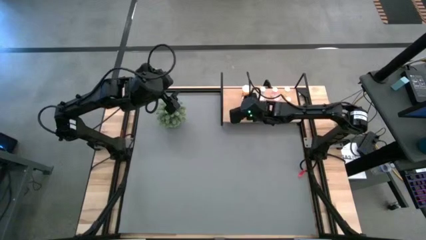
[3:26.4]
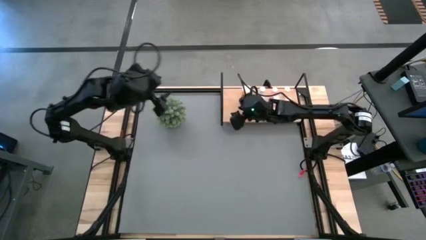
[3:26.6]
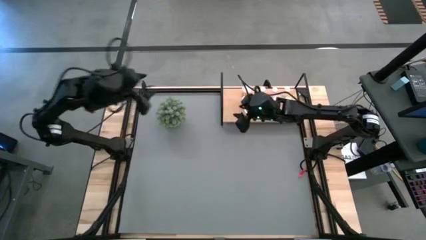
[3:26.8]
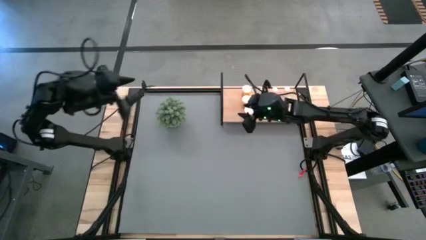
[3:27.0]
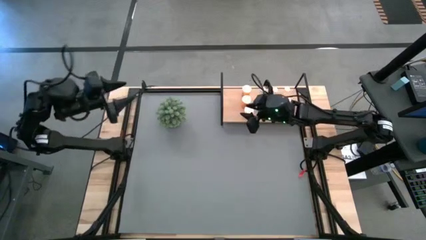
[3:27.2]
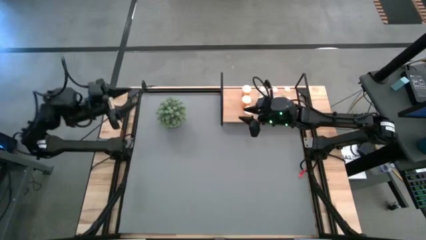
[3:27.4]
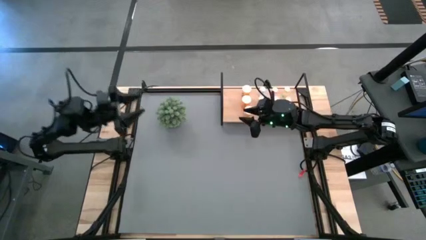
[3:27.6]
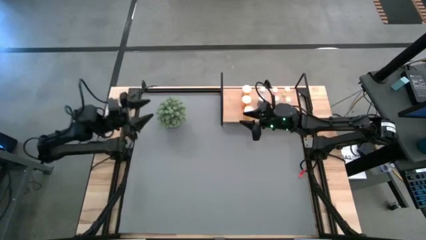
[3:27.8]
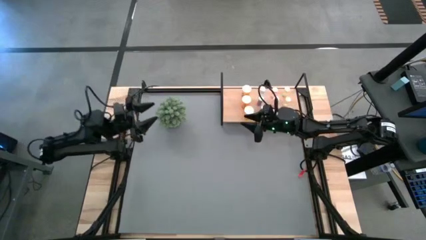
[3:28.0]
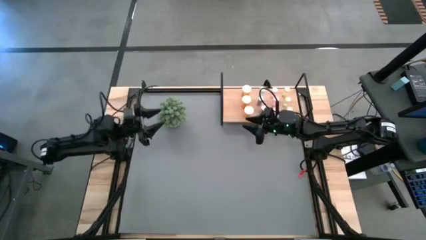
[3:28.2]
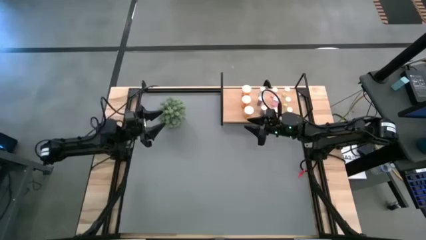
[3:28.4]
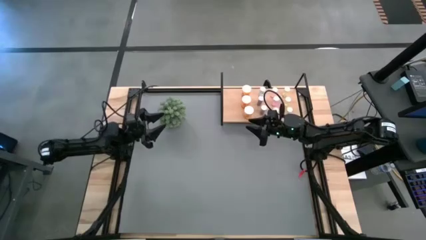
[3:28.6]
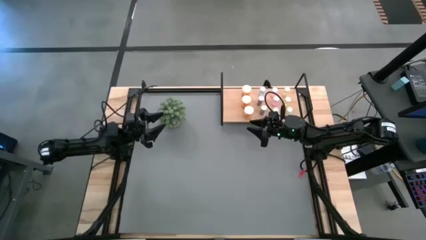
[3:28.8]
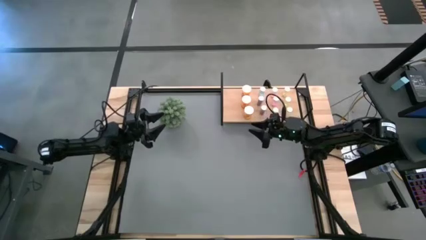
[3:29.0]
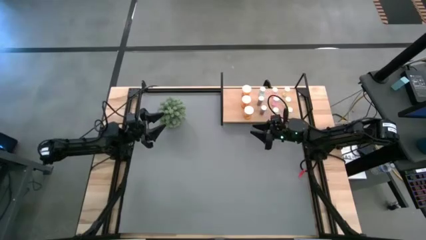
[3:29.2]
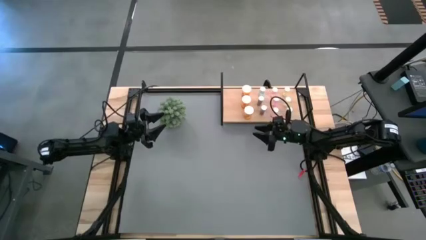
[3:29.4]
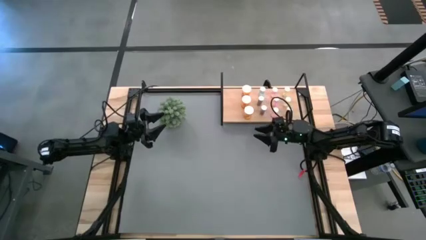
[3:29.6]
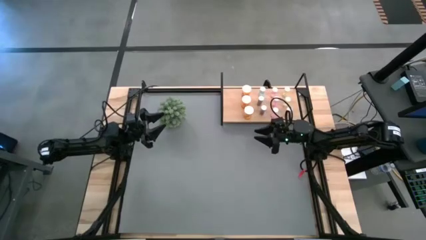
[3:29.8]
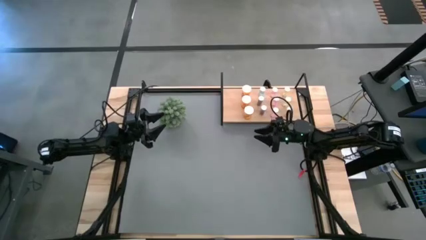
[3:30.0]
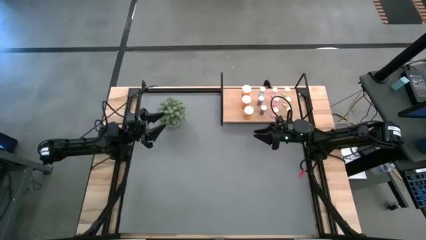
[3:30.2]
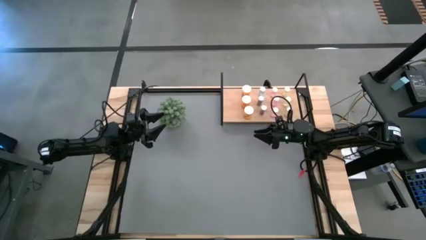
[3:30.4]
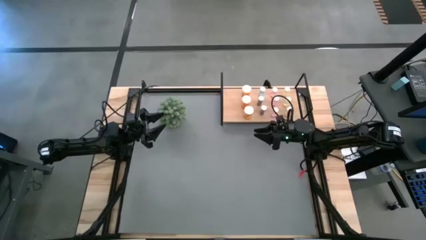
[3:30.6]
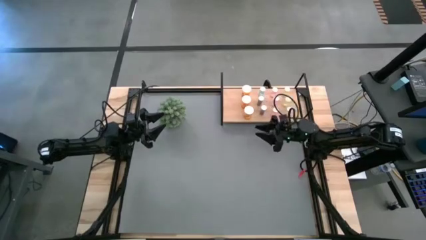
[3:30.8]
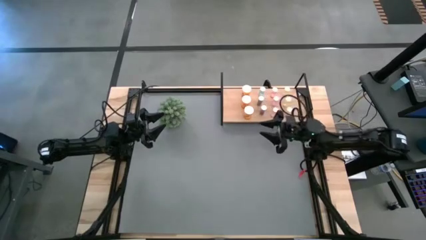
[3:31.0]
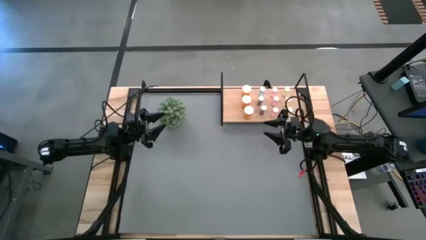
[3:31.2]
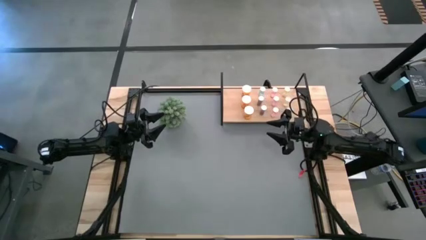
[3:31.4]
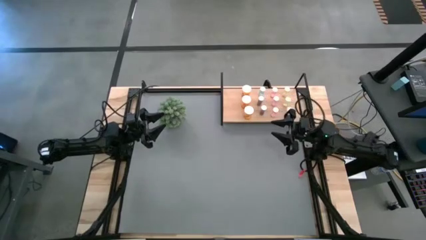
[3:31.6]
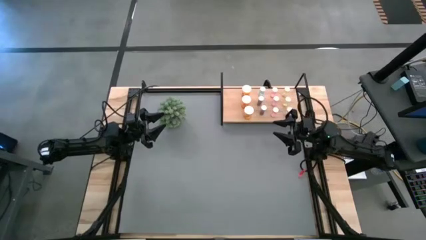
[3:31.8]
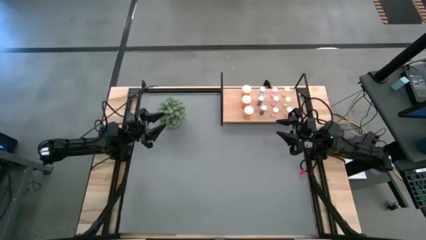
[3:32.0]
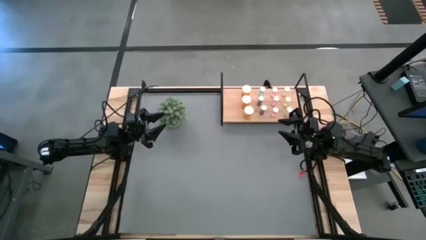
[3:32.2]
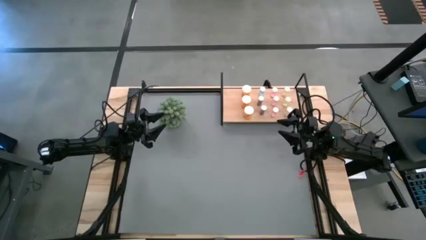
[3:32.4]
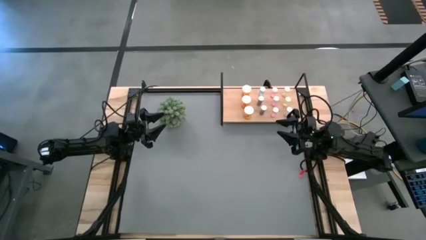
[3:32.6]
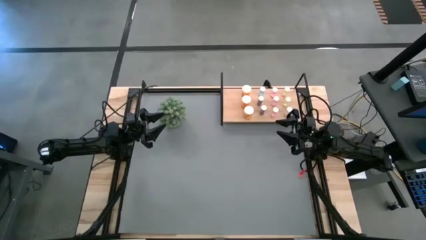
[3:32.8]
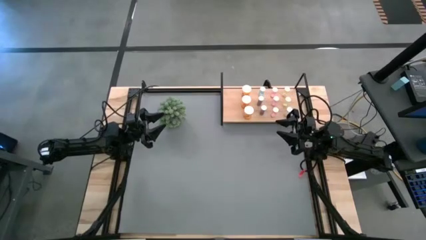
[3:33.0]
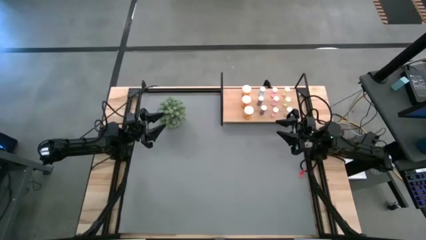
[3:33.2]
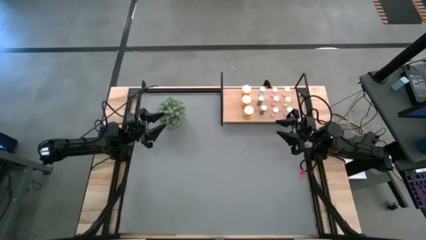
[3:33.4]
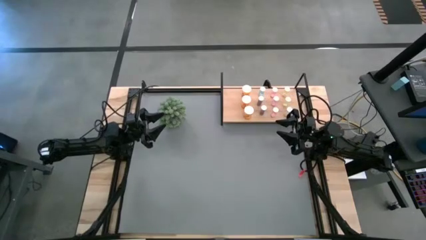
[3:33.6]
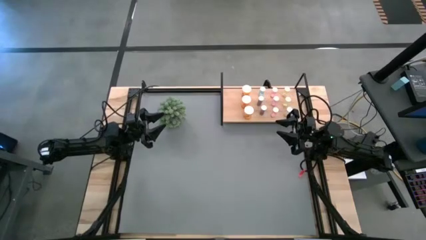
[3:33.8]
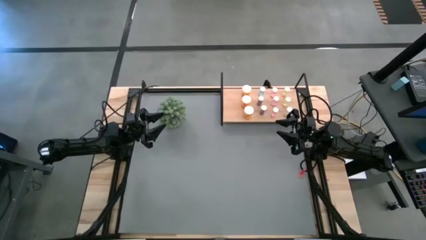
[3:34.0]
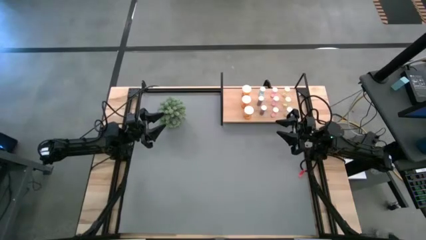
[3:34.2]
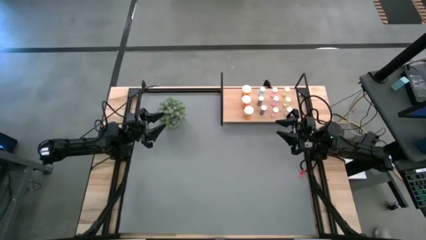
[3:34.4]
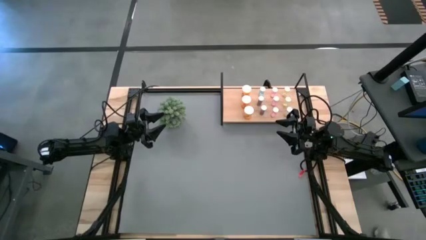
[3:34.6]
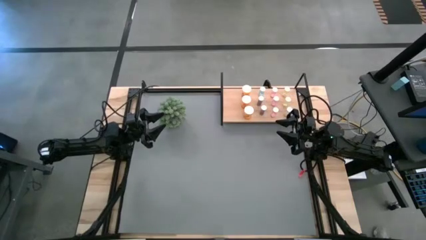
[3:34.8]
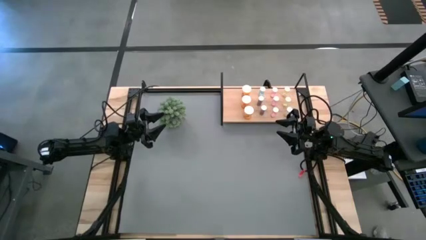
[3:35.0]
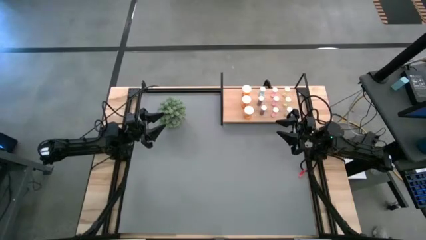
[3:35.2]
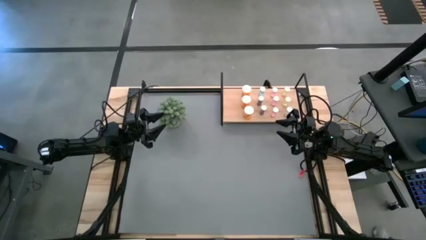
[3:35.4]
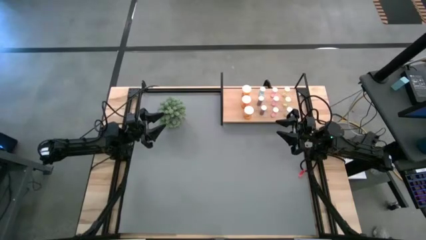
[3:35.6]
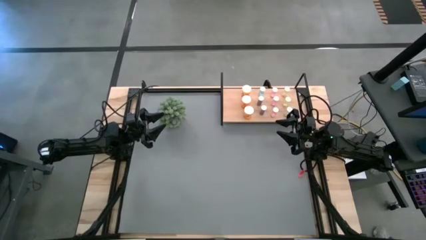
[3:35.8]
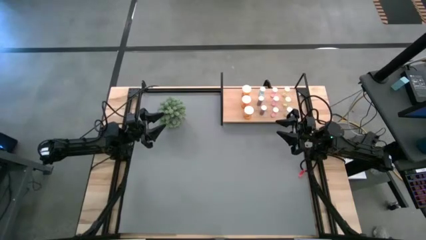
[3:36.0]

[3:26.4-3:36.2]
Task: Pick and place medicine bottles onto shelf by color
Return to Home Position
